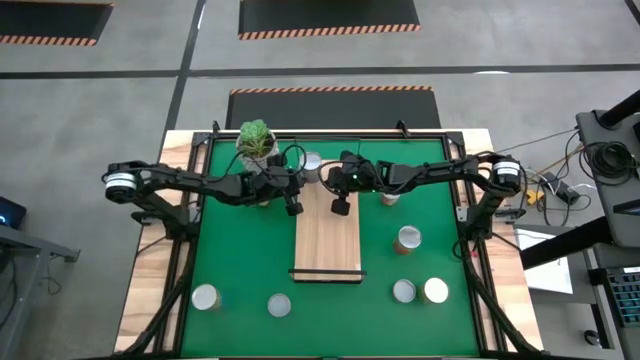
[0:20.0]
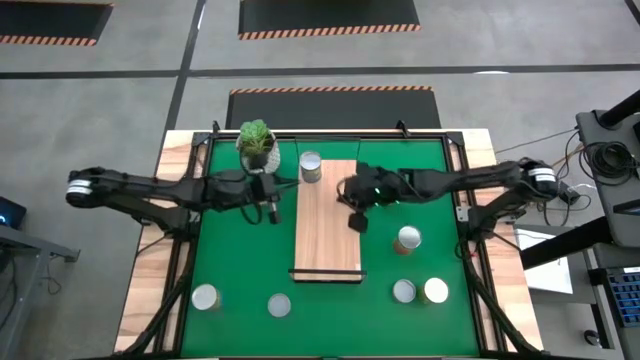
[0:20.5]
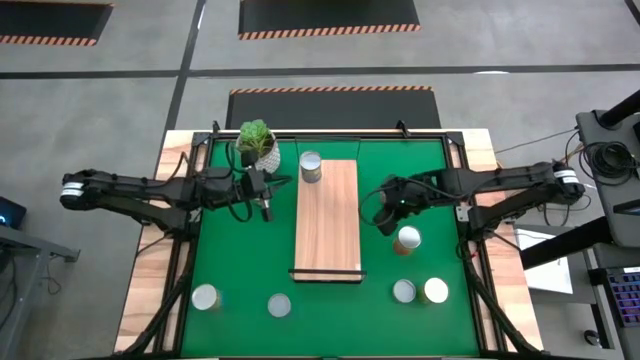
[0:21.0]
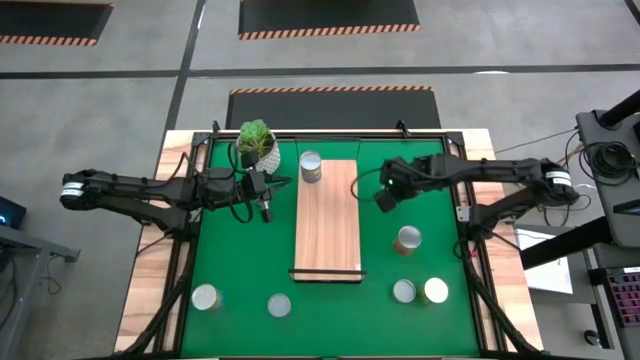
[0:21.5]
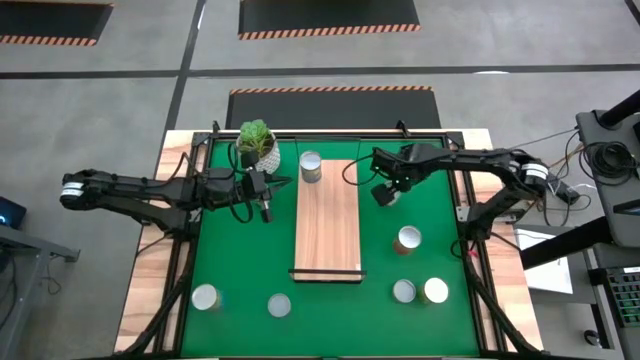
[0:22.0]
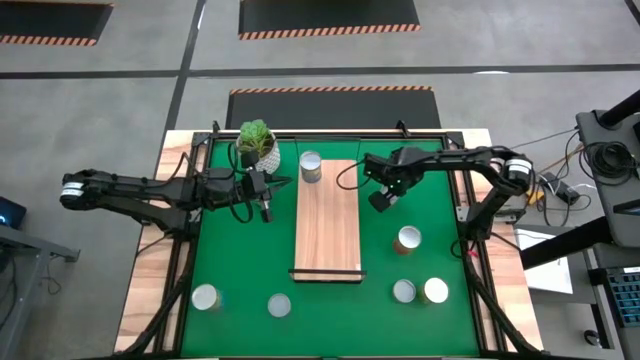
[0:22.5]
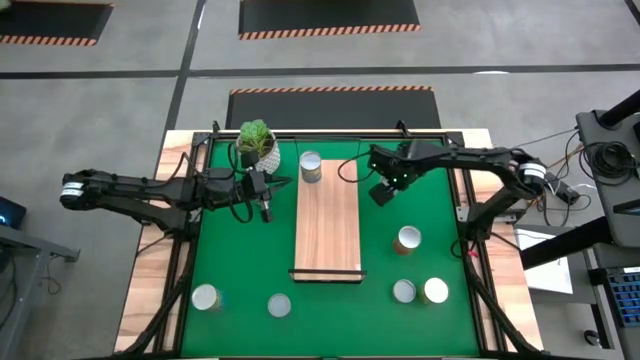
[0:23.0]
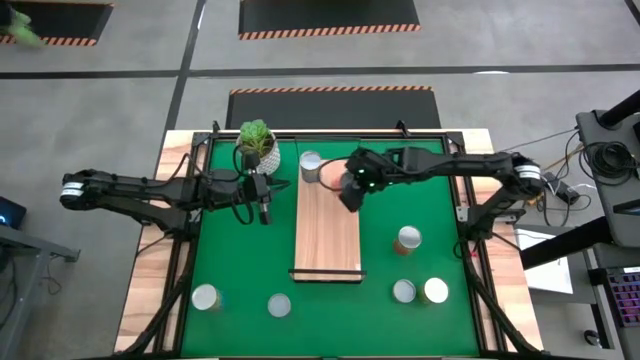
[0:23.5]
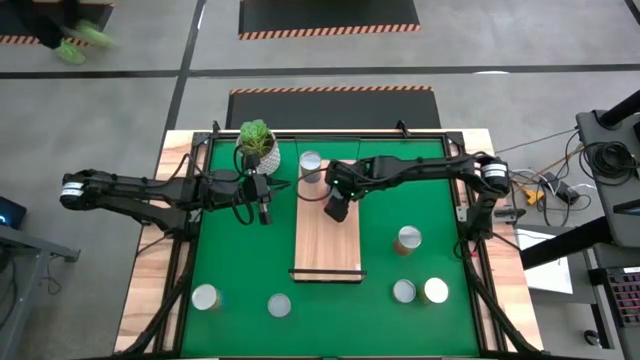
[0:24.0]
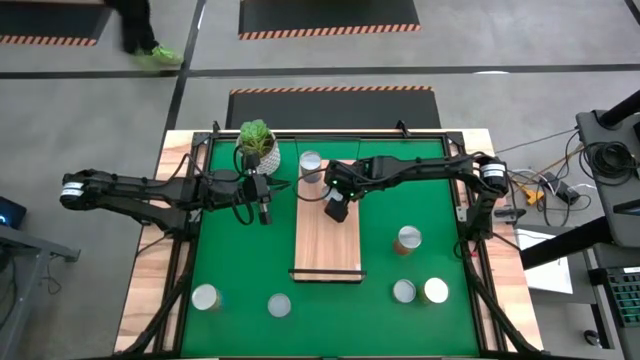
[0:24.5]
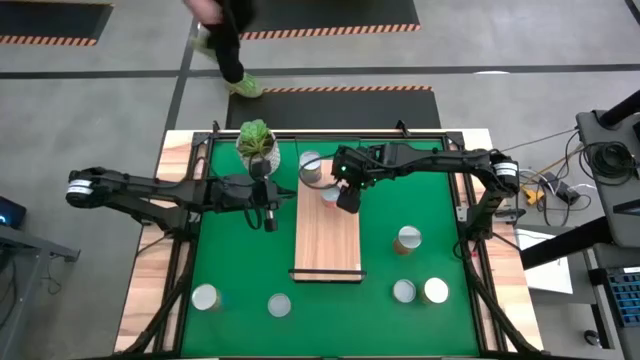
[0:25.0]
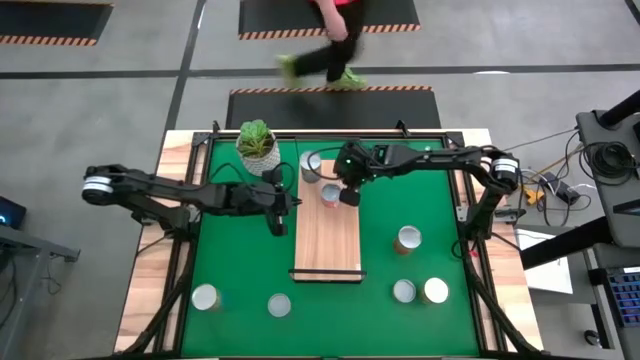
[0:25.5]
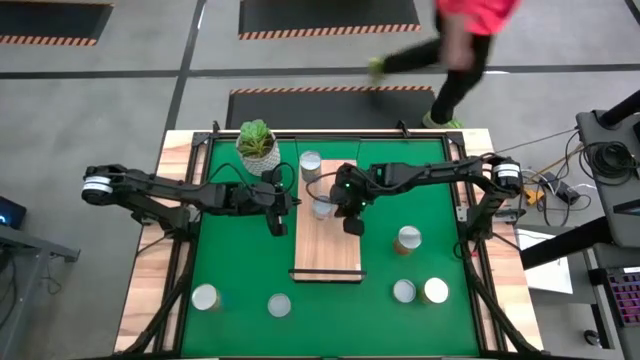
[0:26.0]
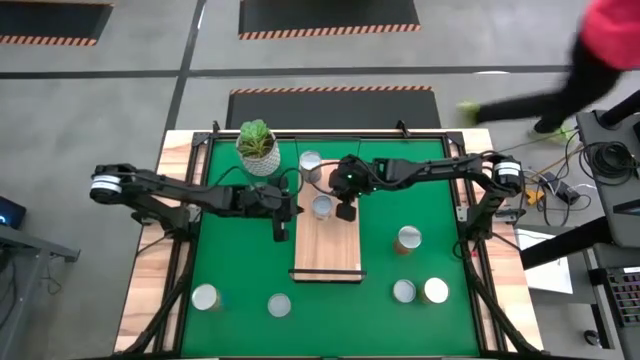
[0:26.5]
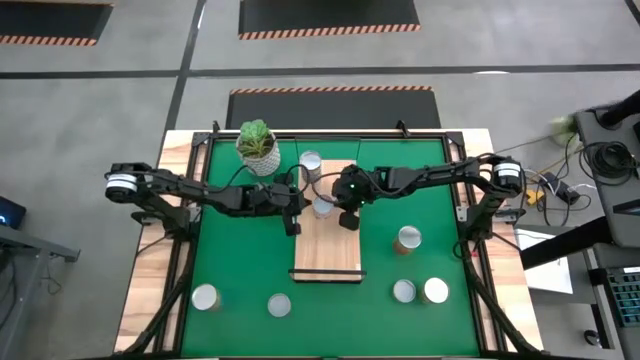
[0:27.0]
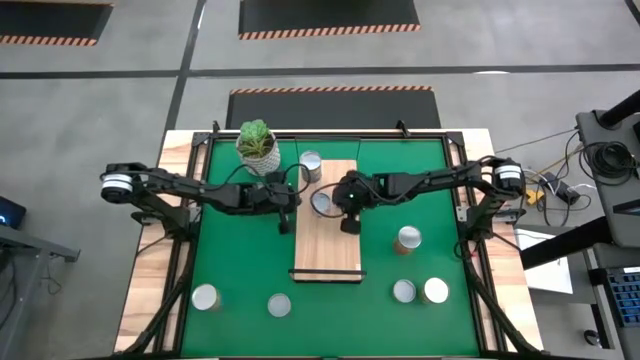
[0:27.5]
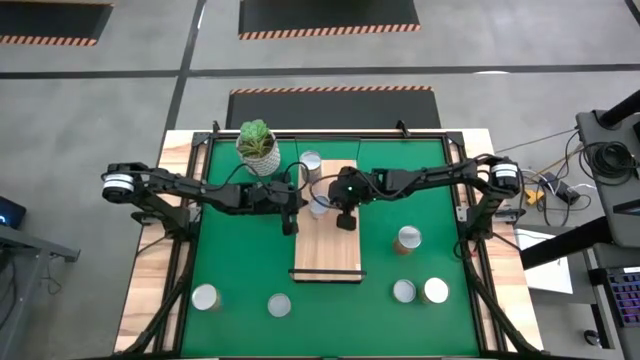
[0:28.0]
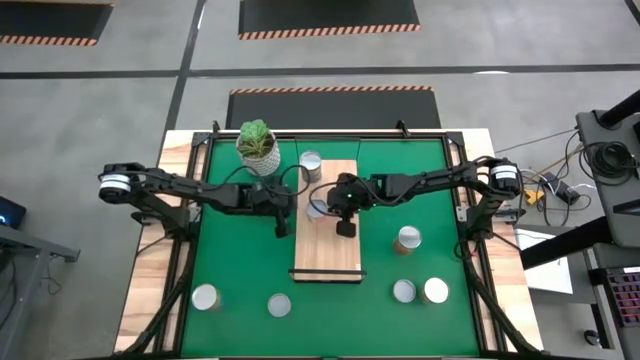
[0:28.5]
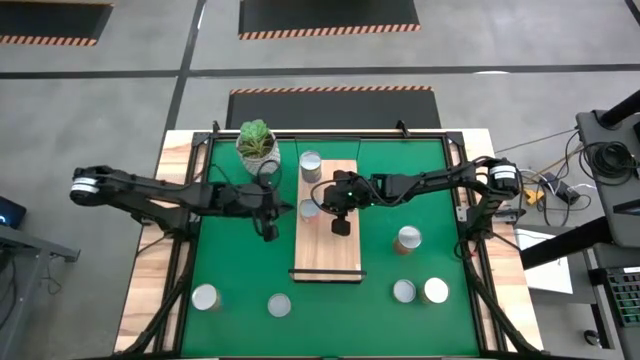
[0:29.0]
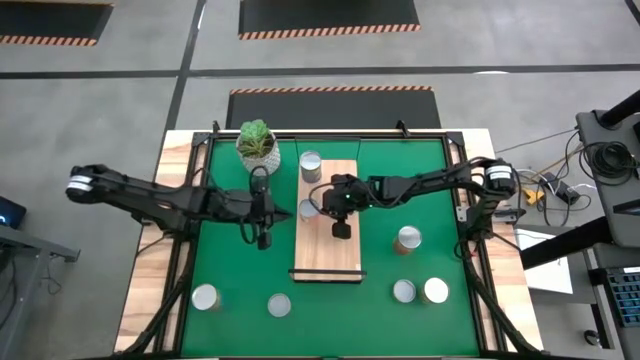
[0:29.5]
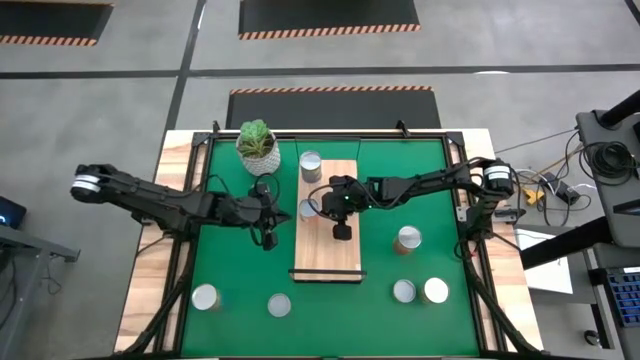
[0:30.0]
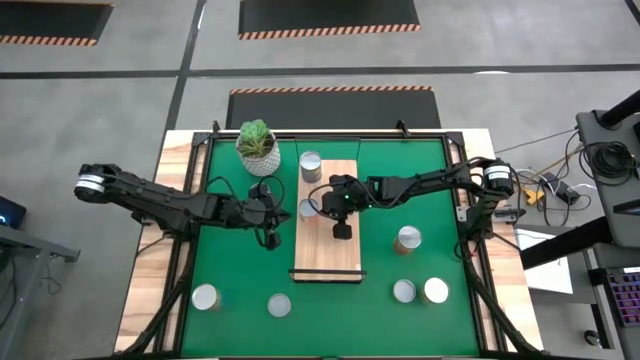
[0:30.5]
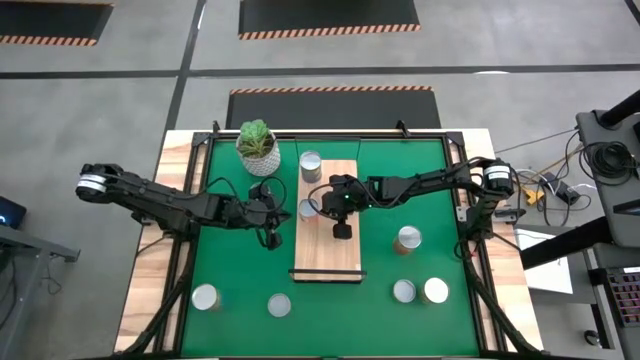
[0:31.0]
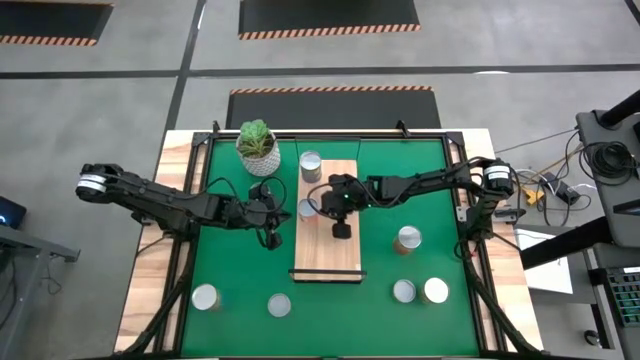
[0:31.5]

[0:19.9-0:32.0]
Task: Pick and place cans onto a shelf
Put the canned spaghetti sauce on the shelf

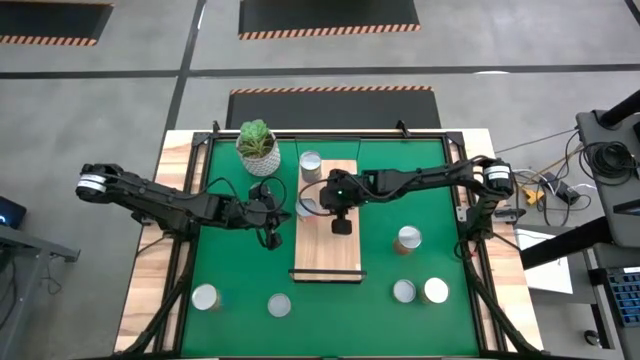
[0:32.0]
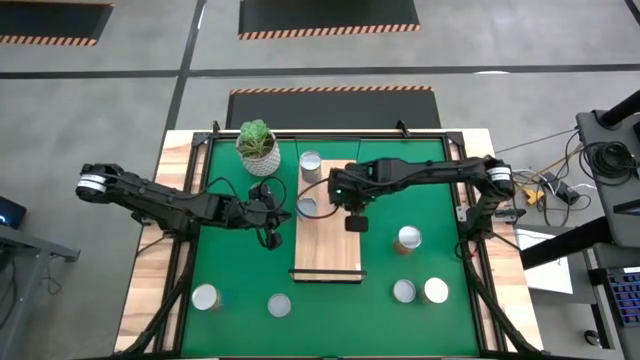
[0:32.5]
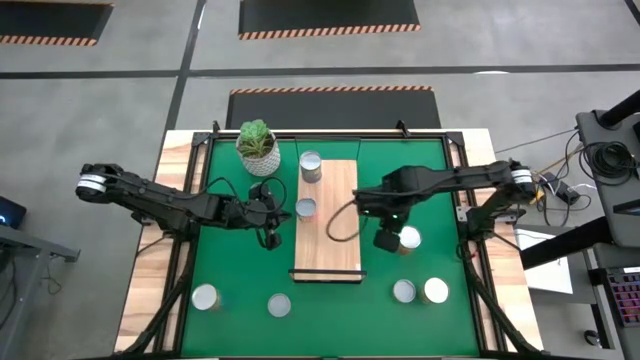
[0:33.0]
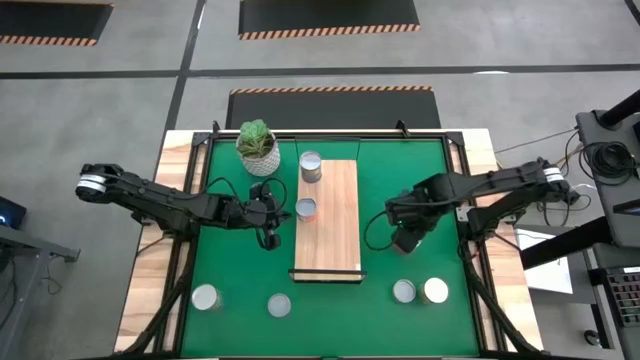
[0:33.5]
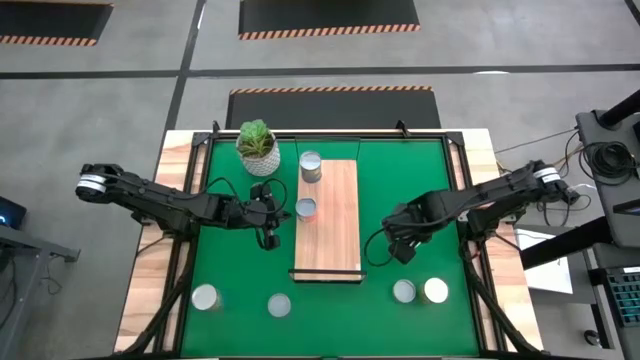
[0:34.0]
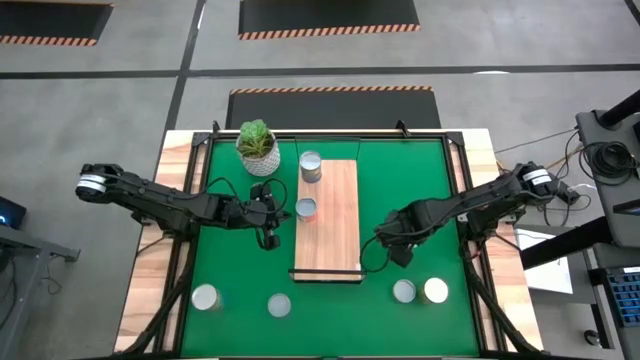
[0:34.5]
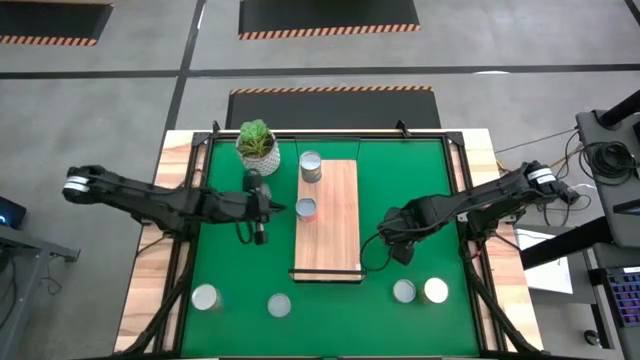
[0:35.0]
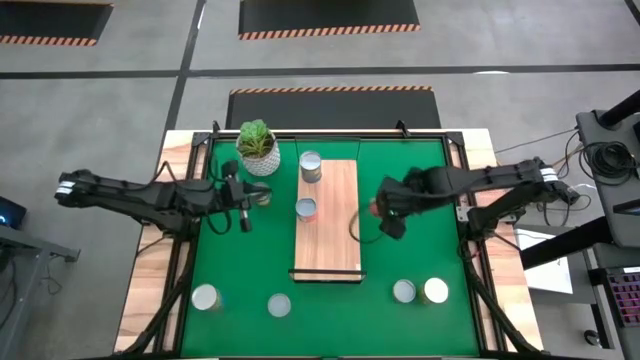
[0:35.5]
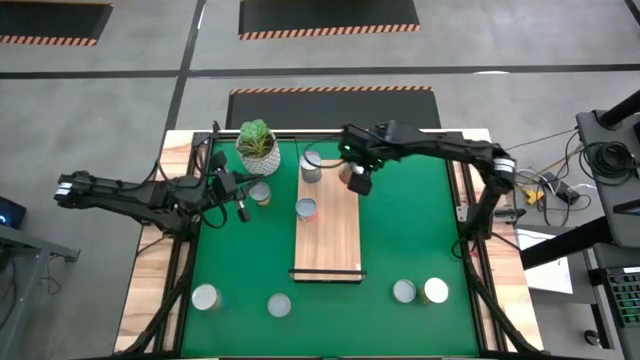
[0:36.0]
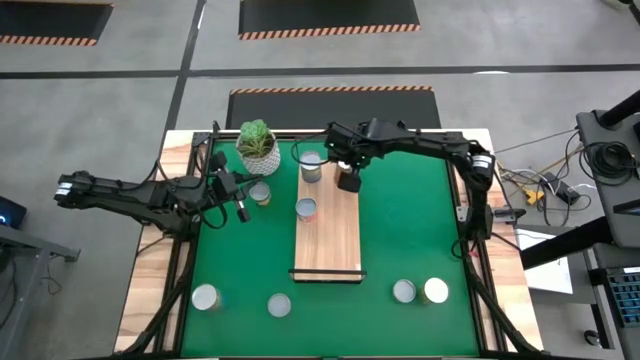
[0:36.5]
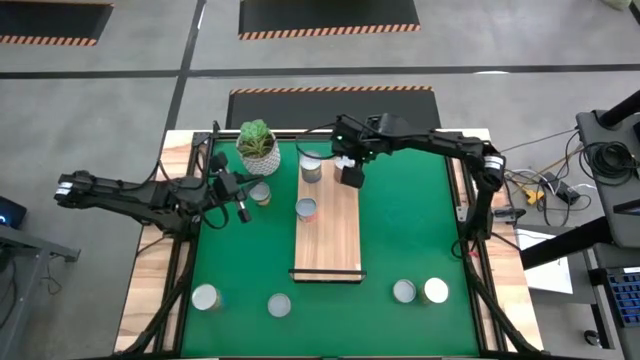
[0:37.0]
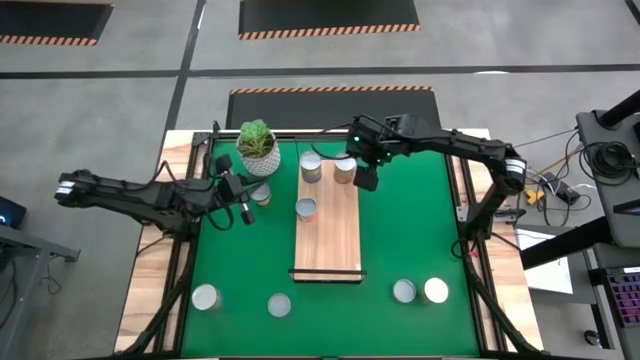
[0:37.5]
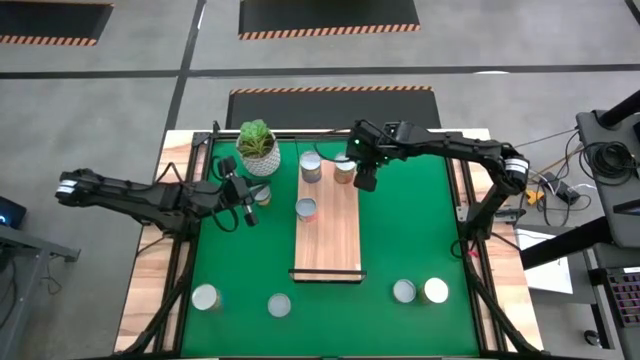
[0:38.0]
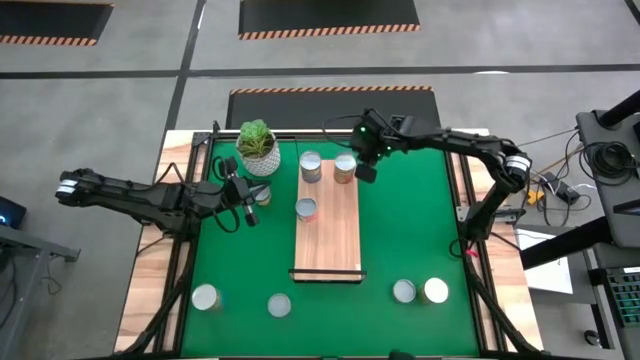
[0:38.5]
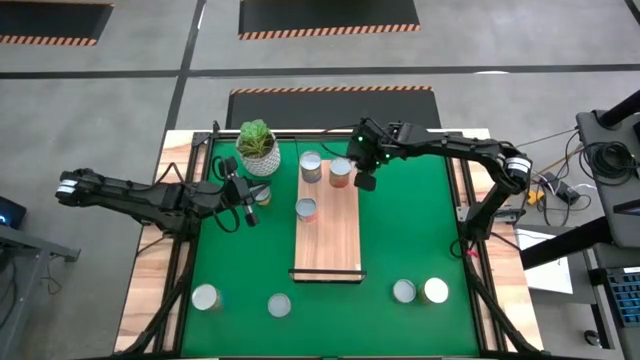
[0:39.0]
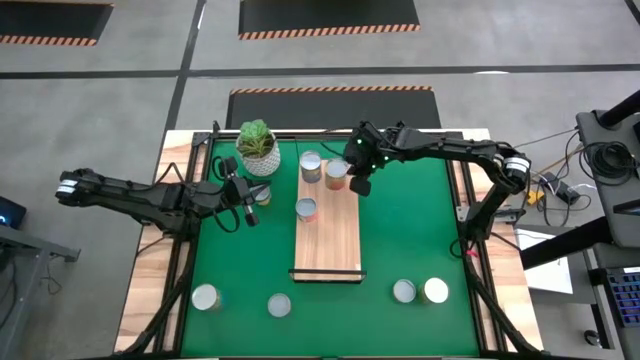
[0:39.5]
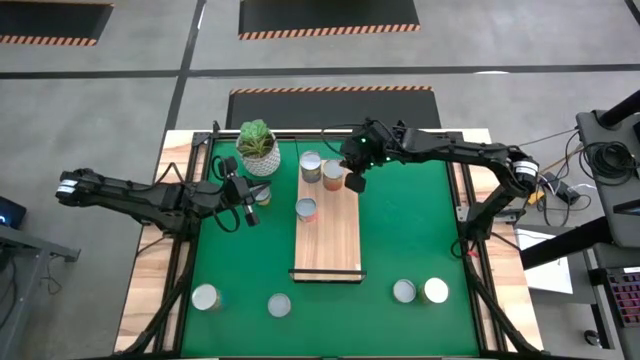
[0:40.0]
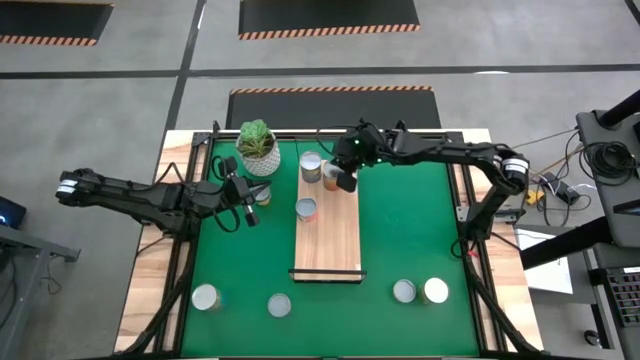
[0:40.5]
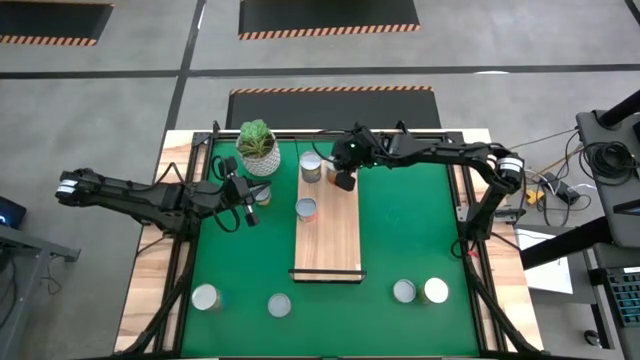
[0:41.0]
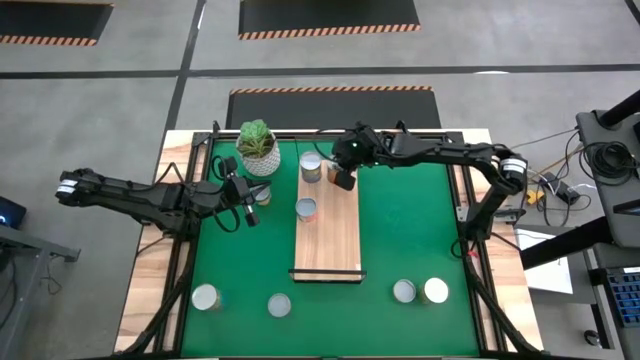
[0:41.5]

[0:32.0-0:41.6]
Put the canned pineapple on the shelf
